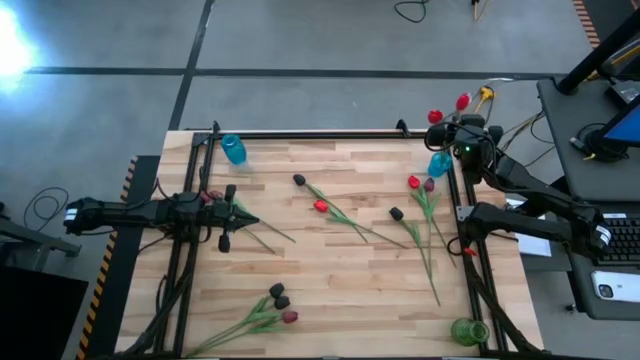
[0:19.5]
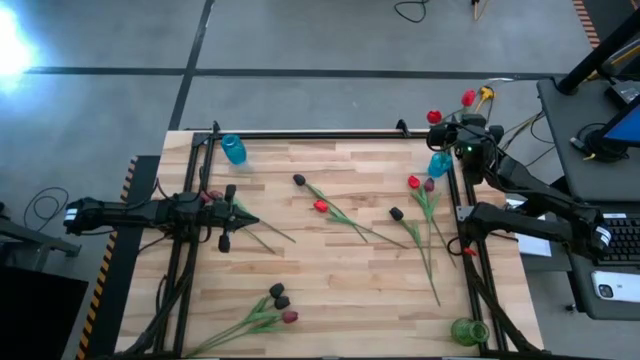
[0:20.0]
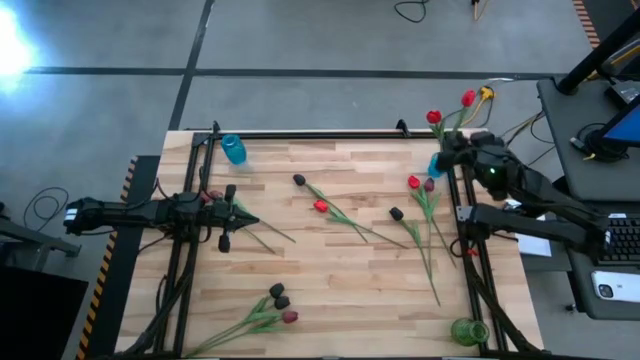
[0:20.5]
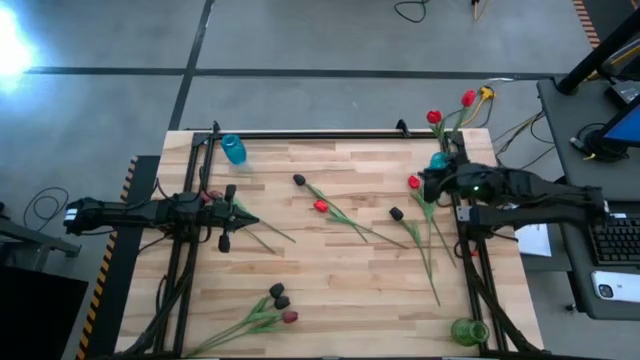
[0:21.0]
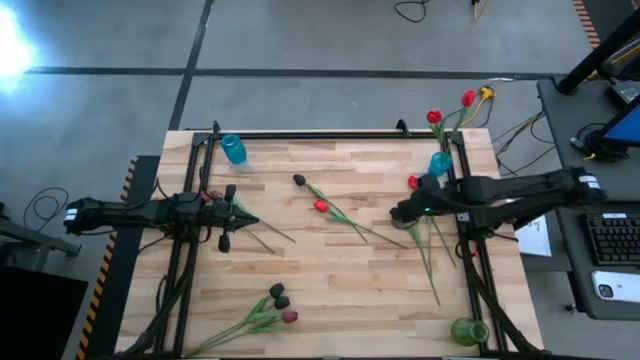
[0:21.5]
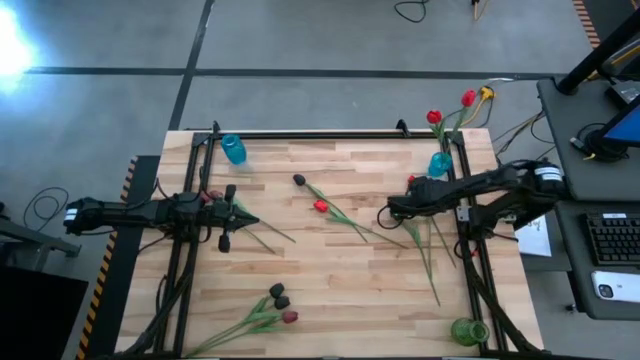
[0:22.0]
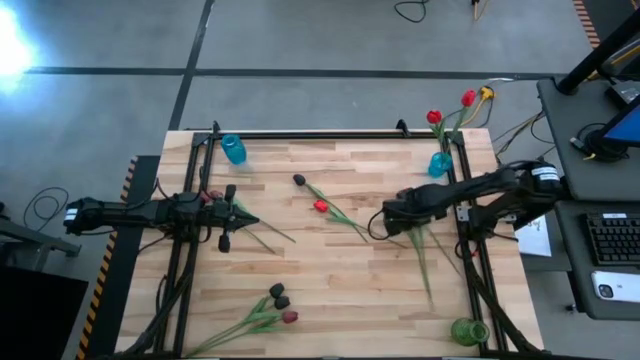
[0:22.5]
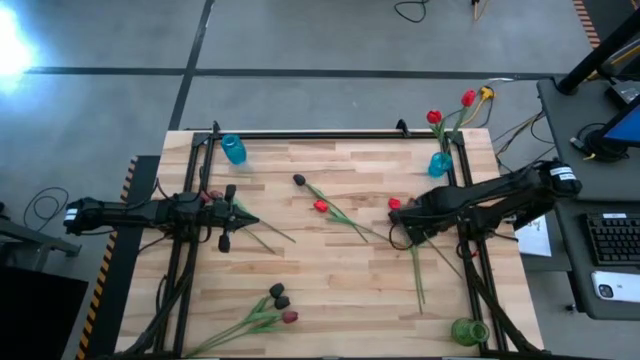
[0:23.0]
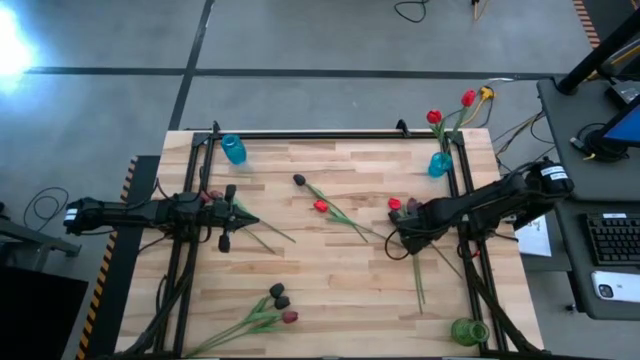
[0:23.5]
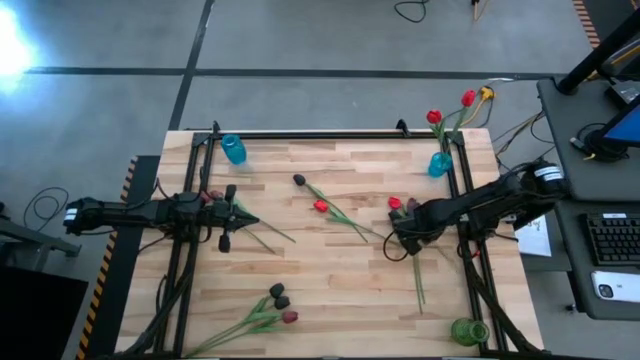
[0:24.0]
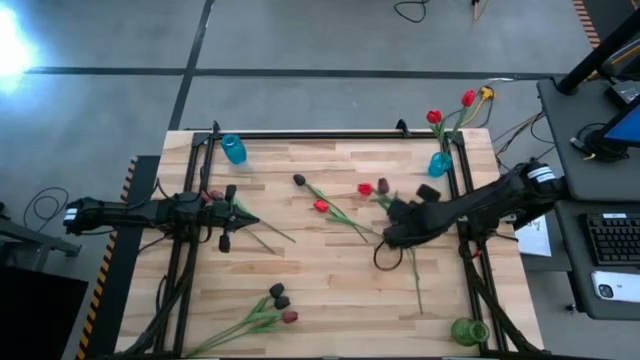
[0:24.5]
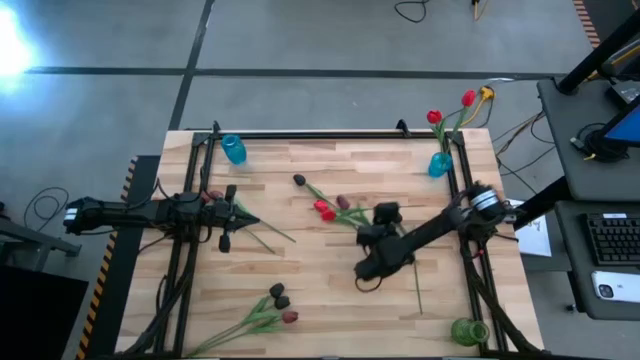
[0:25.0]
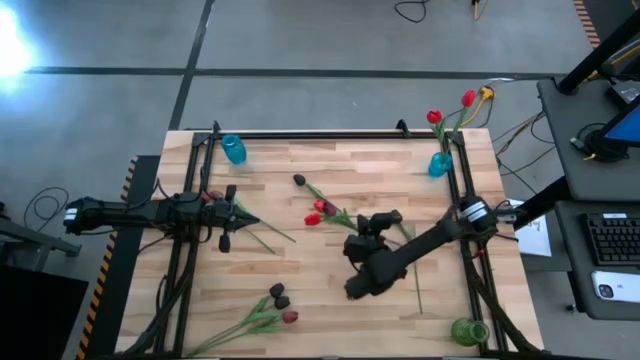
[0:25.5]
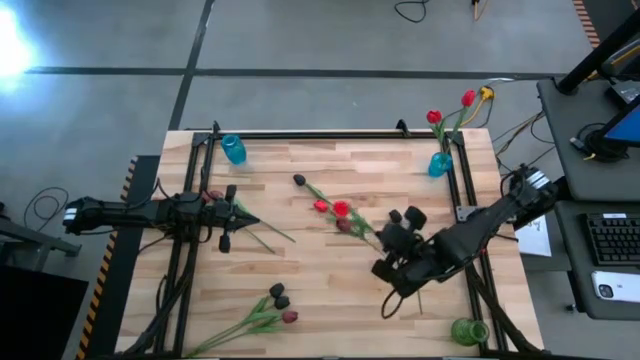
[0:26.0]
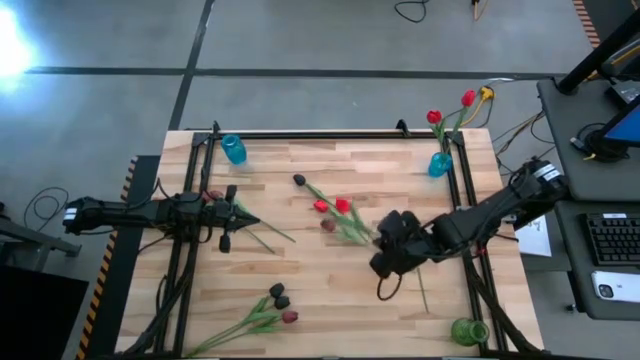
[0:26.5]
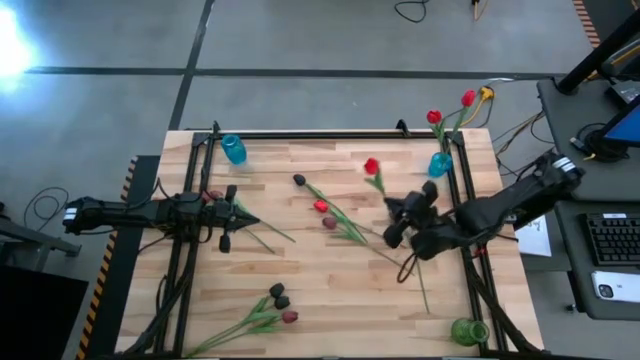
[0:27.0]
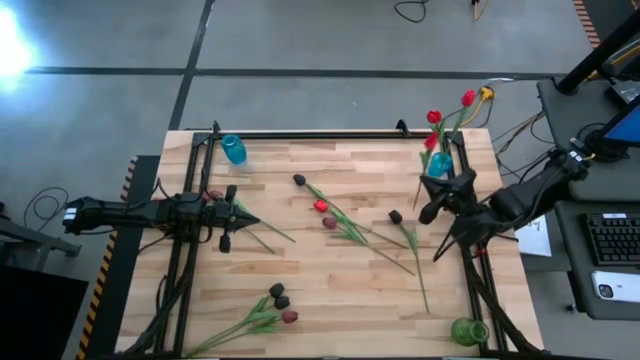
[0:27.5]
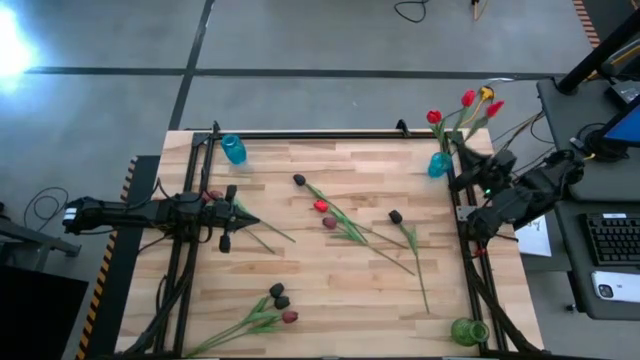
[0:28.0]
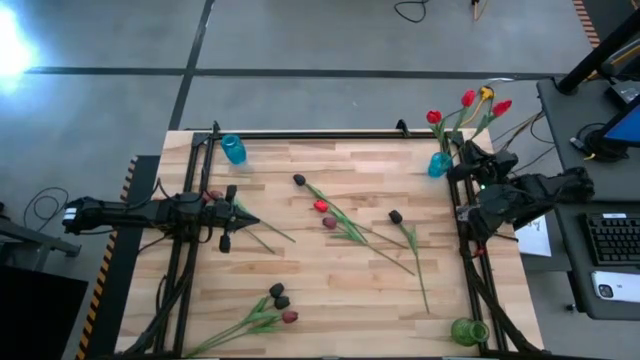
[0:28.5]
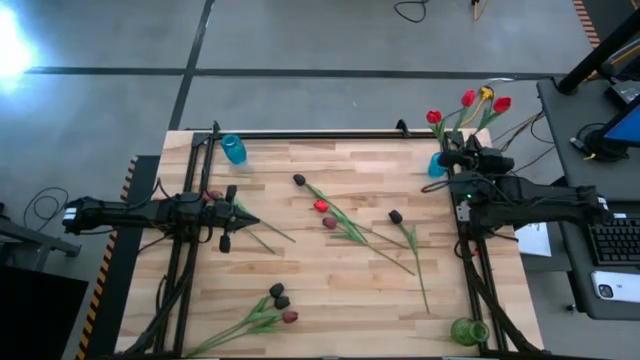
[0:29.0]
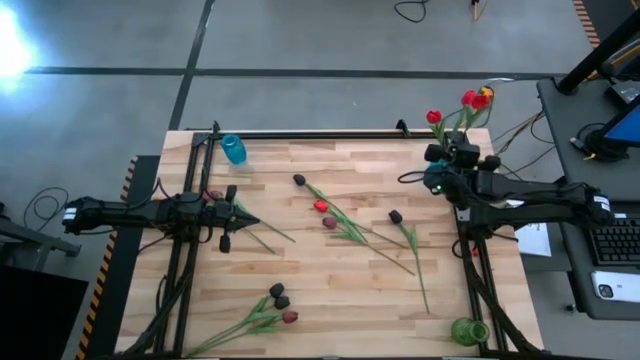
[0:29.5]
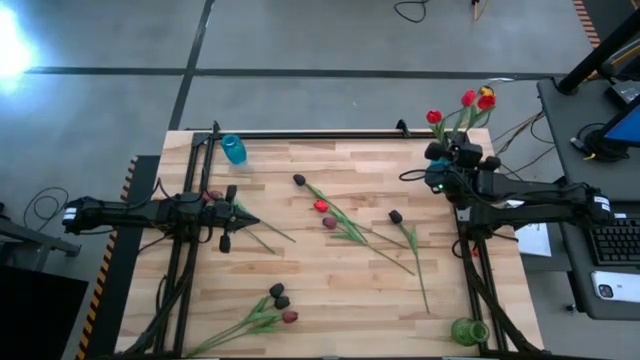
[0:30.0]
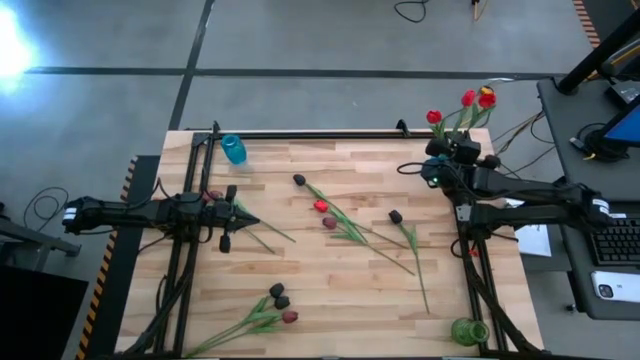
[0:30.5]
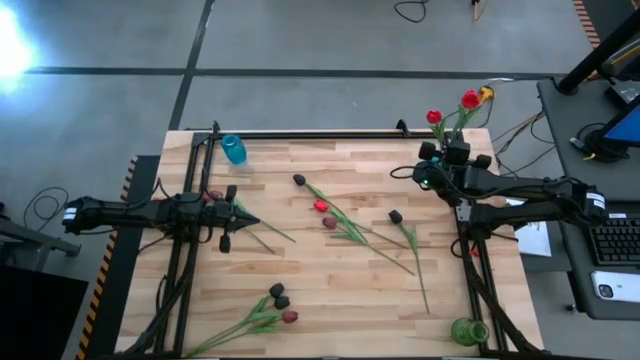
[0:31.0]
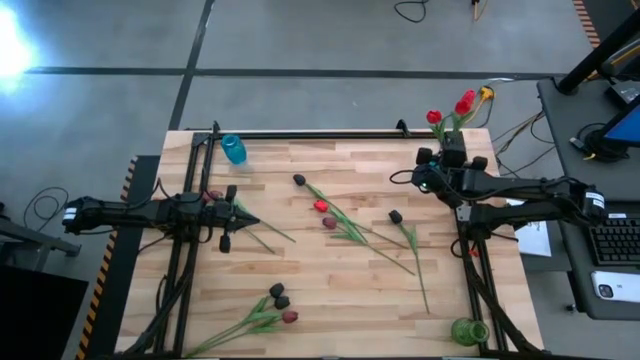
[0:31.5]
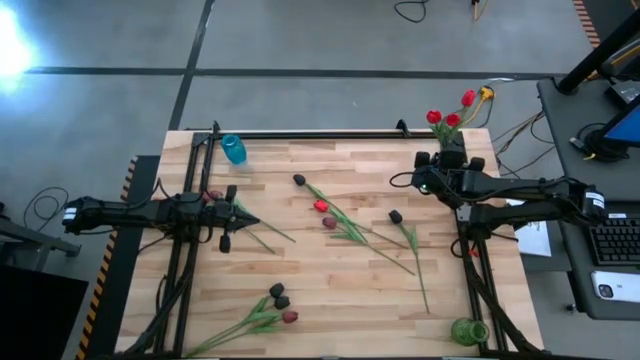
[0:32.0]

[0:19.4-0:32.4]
Task: Sort flowers into vase by color
Put the red tulip into the right blue vase

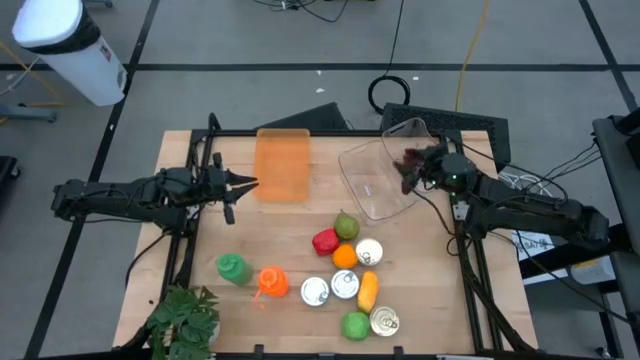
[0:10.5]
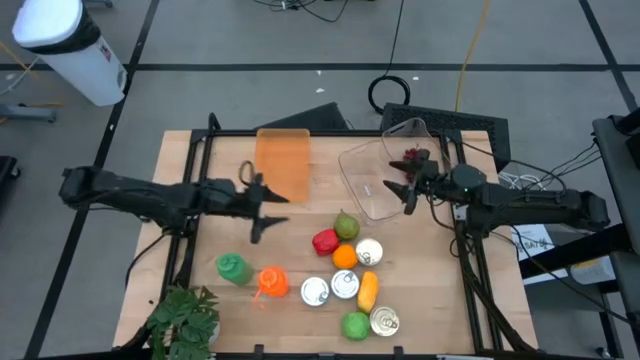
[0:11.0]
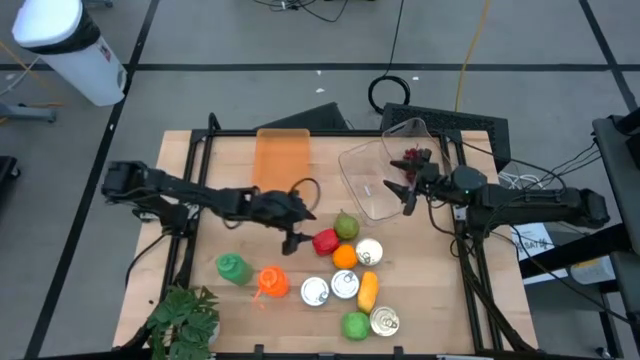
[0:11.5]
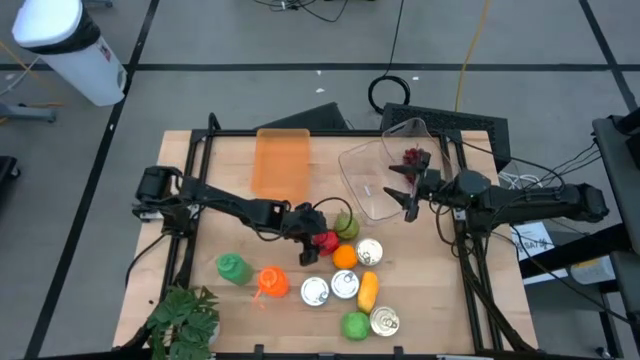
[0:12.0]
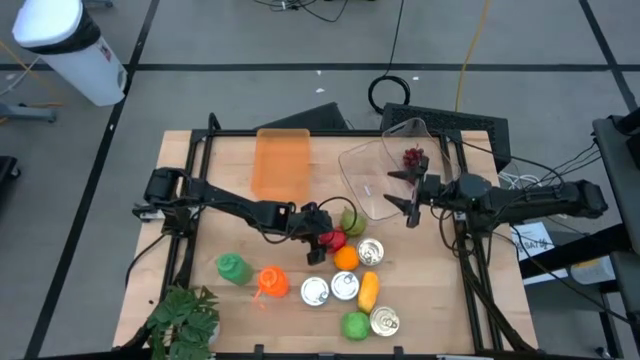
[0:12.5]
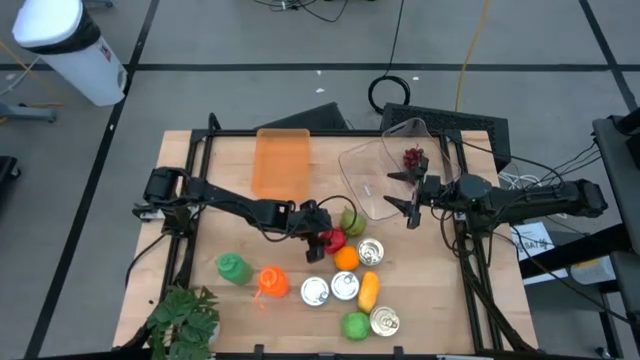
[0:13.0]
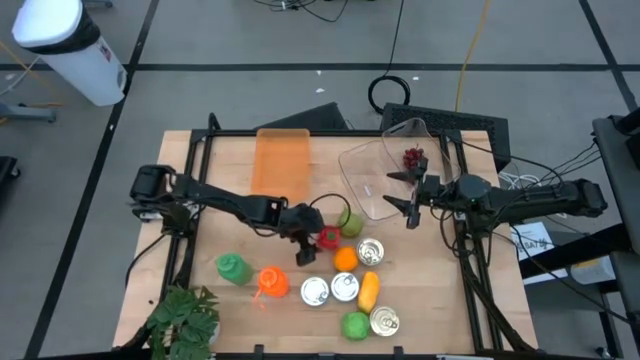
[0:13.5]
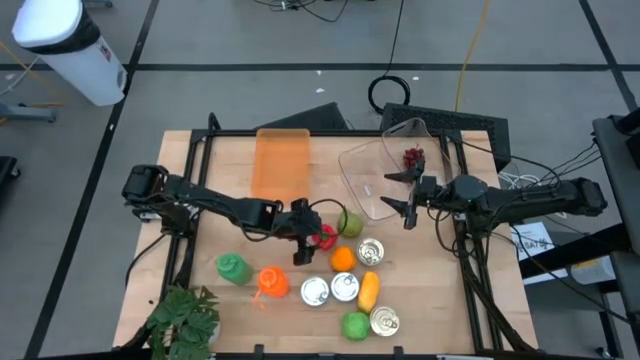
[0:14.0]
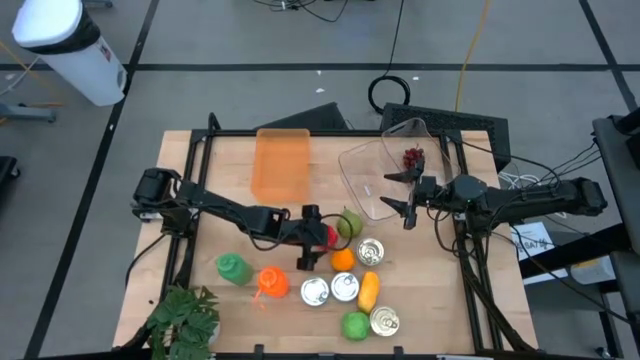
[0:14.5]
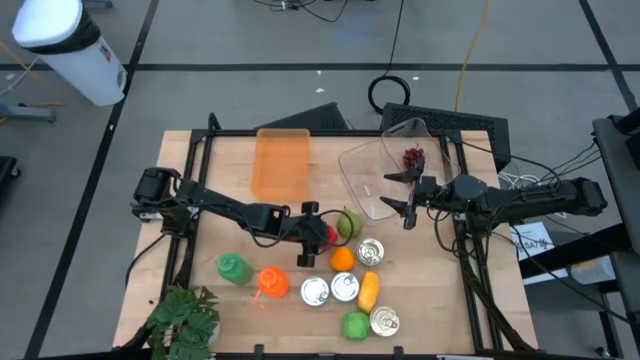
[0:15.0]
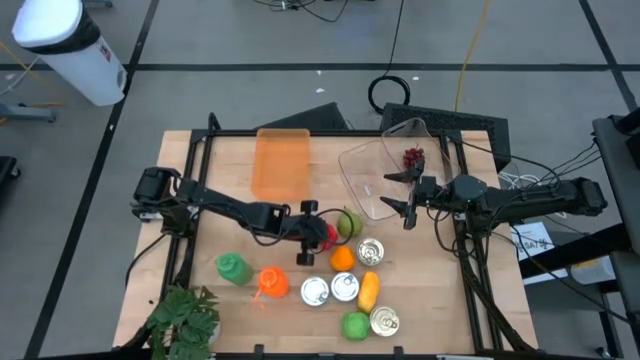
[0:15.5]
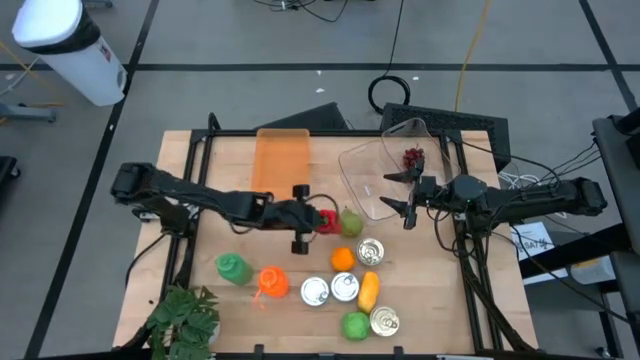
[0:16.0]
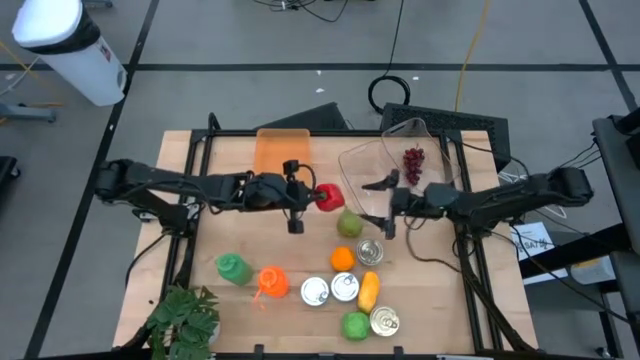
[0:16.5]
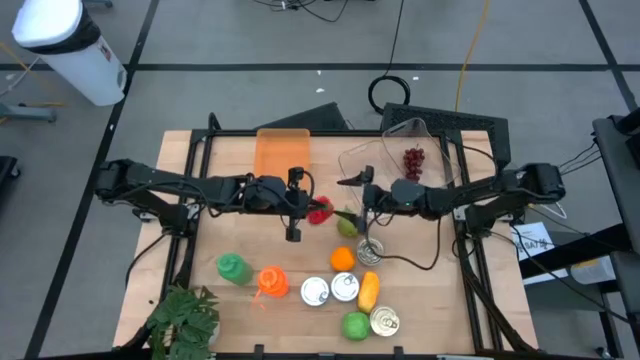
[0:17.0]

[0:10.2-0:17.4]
Task: Pick & Place Food Item
Put the red bell pepper into the right transparent bin

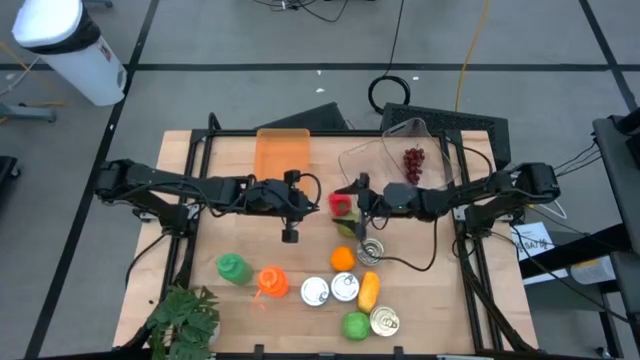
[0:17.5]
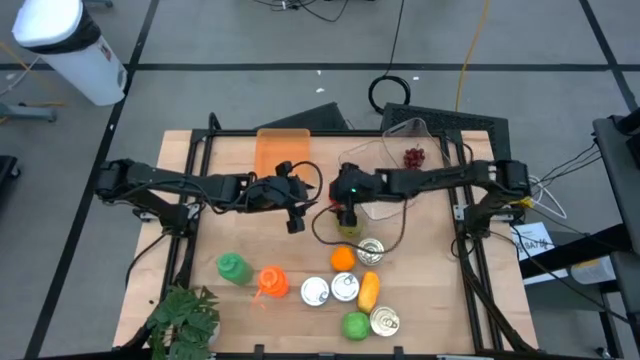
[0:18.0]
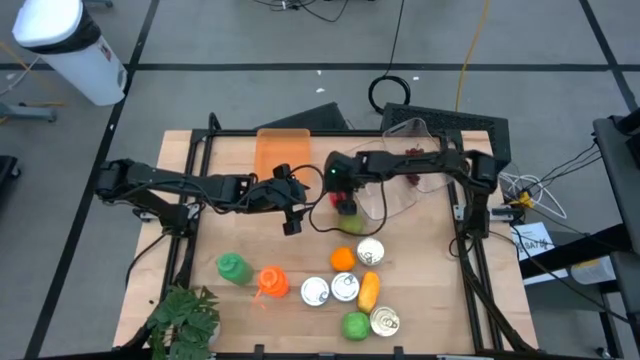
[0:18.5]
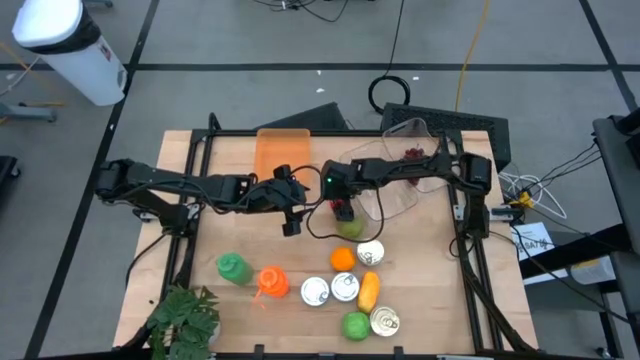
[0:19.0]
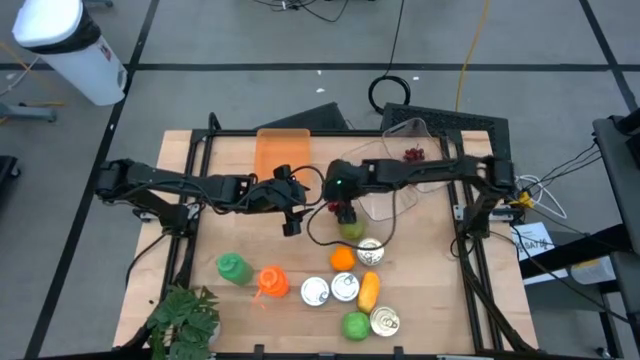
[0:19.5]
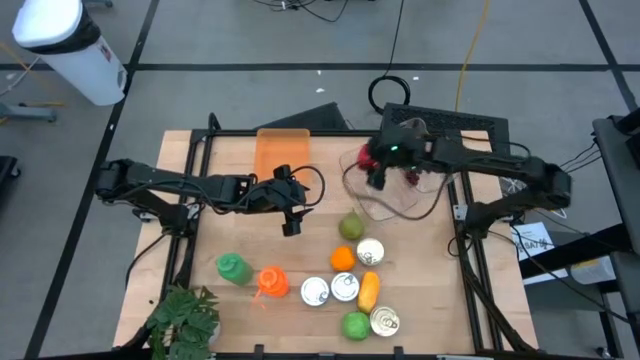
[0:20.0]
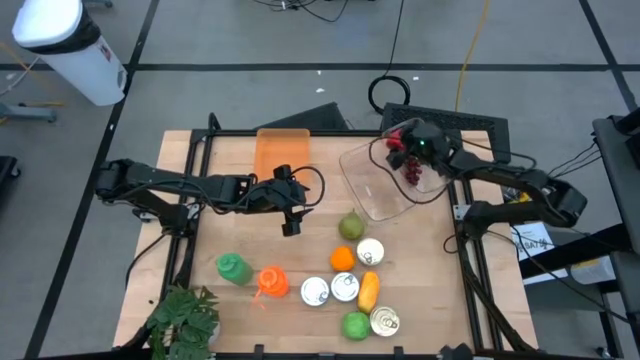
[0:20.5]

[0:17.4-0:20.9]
Put the red bell pepper into the right transparent bin
